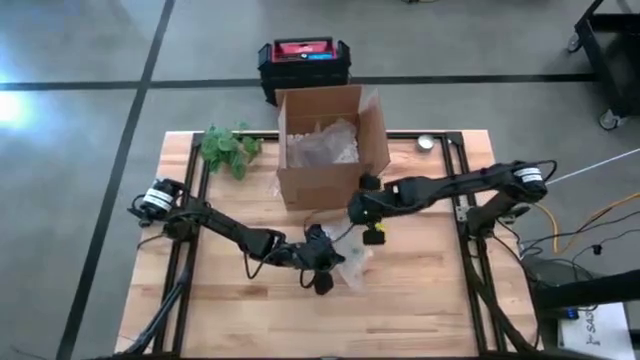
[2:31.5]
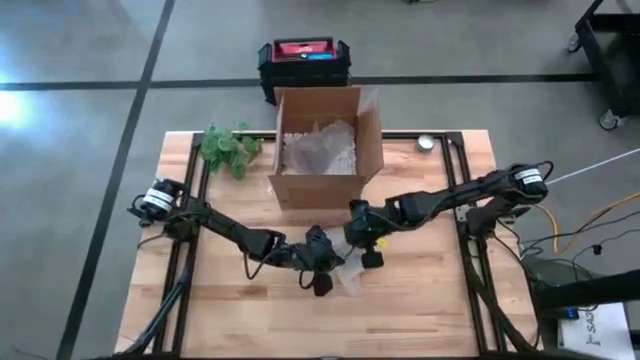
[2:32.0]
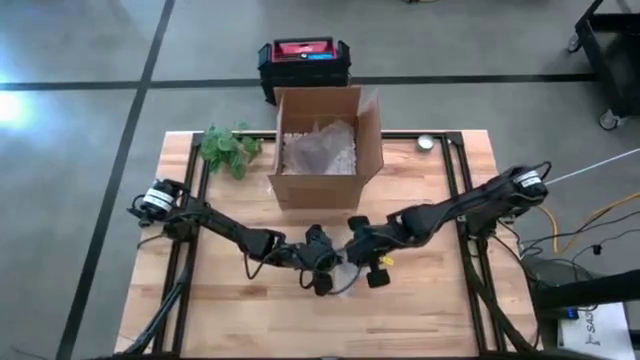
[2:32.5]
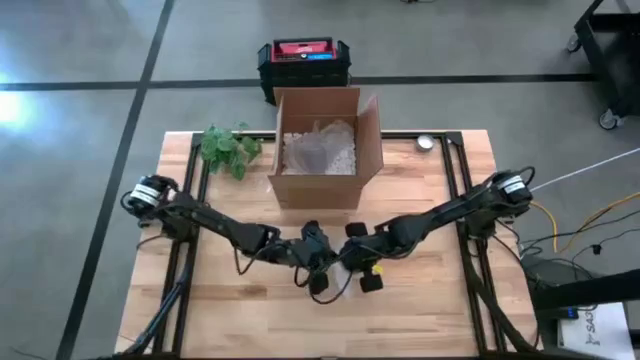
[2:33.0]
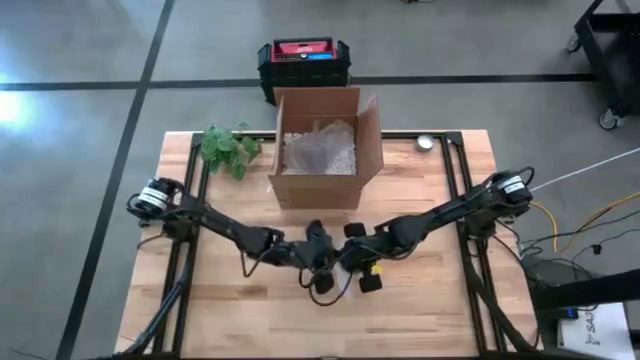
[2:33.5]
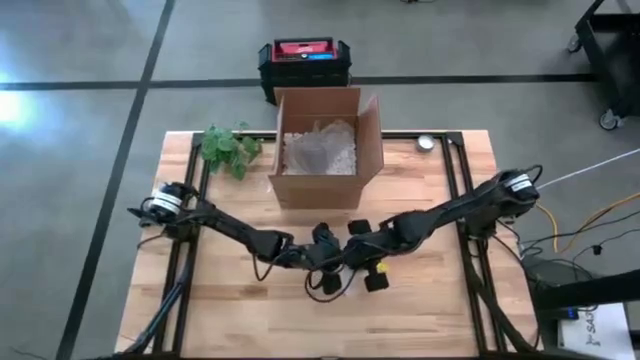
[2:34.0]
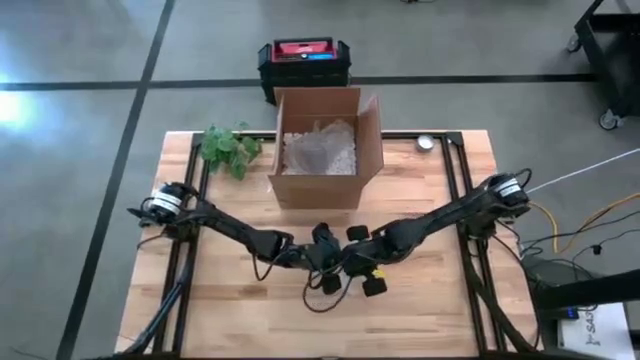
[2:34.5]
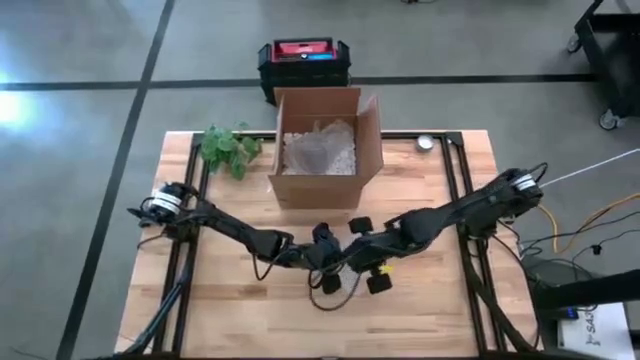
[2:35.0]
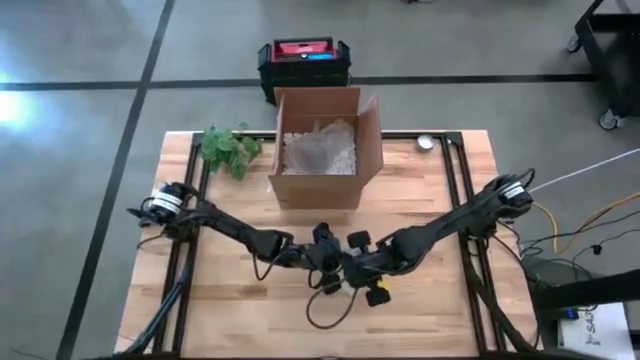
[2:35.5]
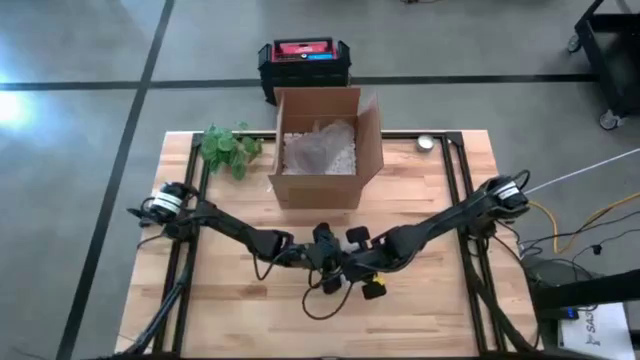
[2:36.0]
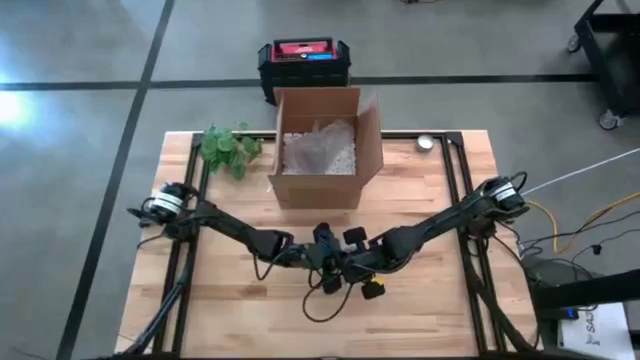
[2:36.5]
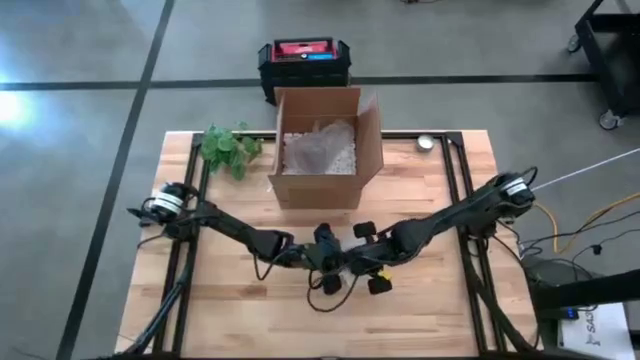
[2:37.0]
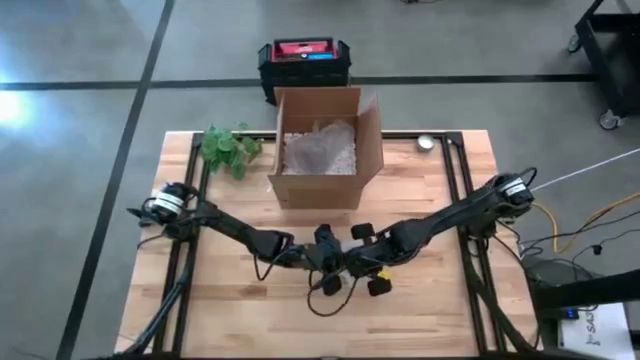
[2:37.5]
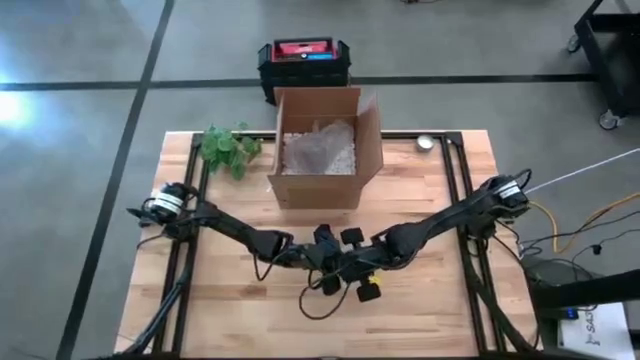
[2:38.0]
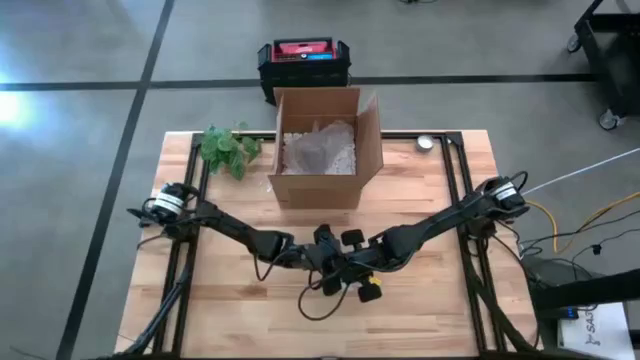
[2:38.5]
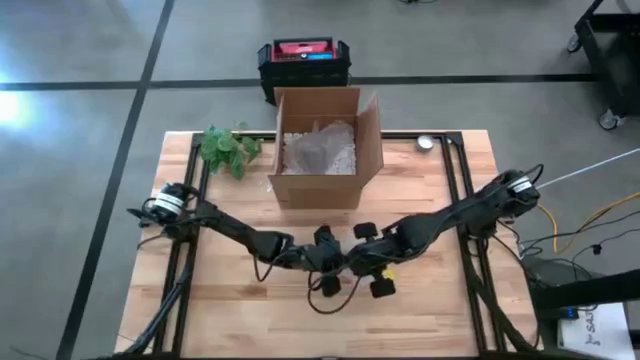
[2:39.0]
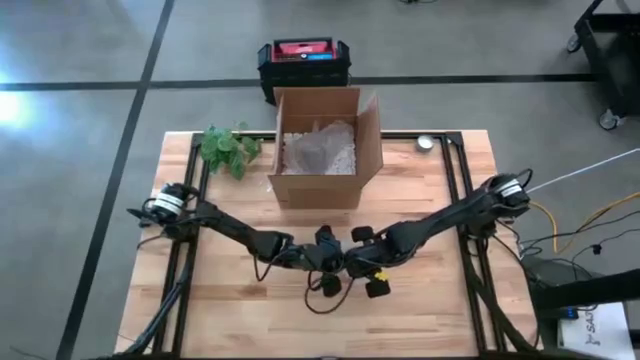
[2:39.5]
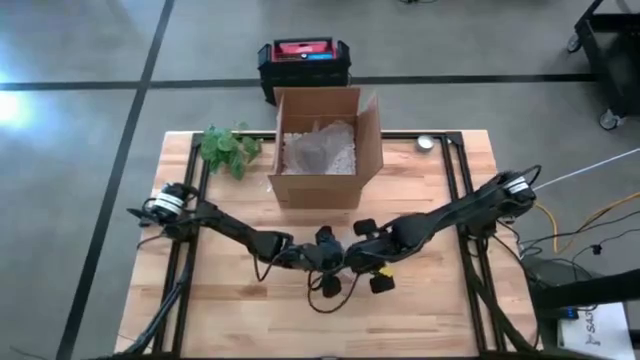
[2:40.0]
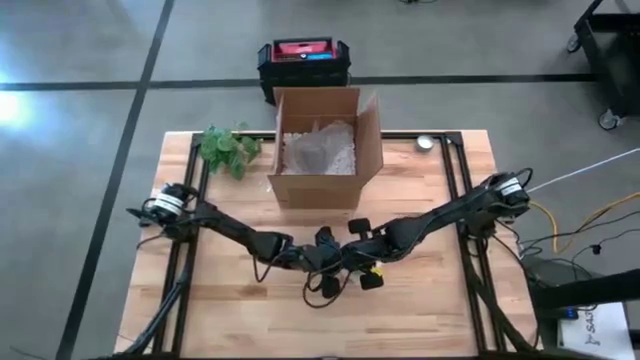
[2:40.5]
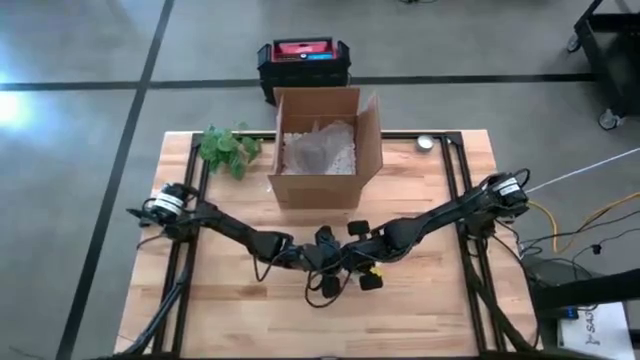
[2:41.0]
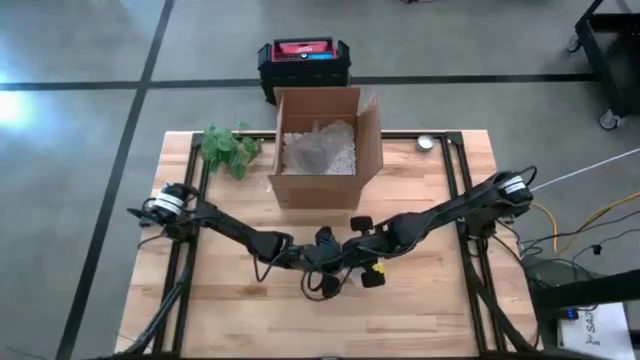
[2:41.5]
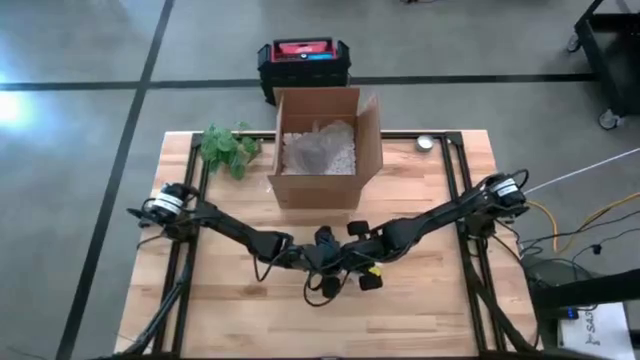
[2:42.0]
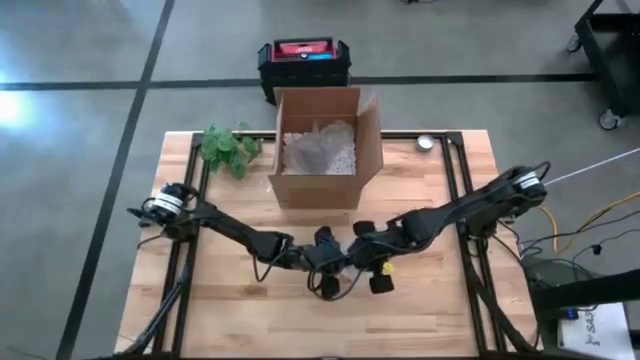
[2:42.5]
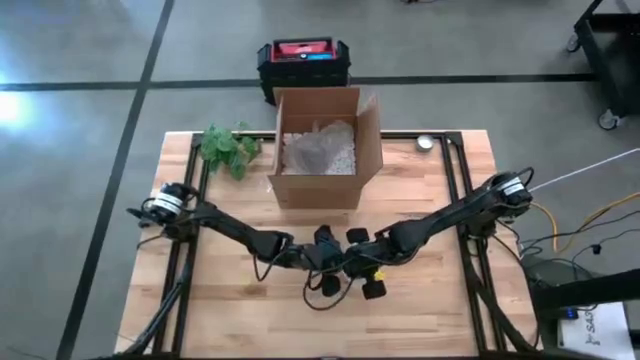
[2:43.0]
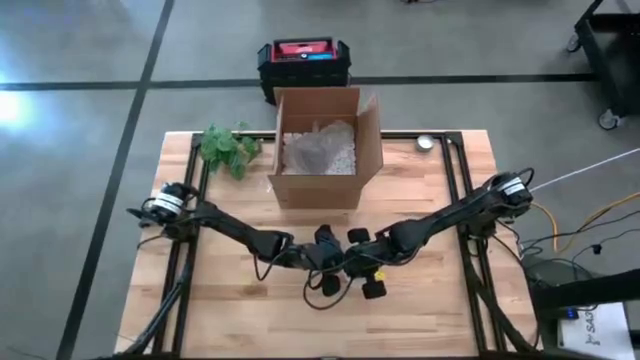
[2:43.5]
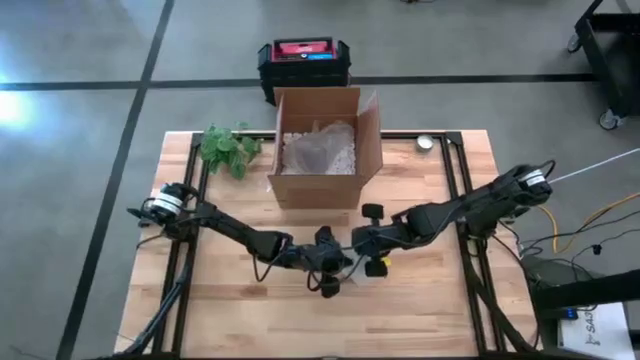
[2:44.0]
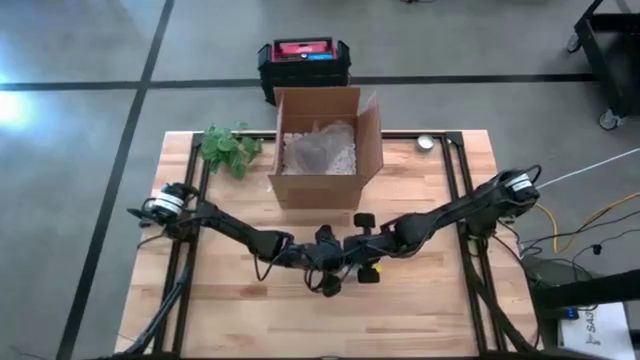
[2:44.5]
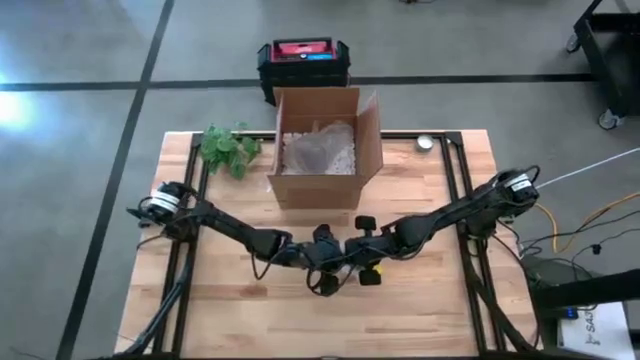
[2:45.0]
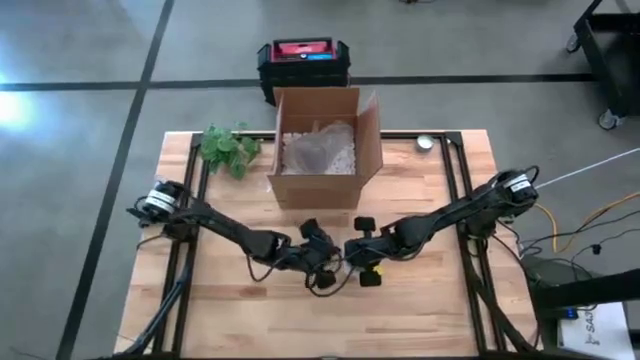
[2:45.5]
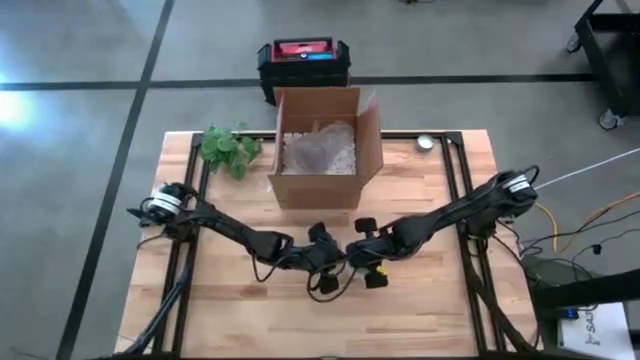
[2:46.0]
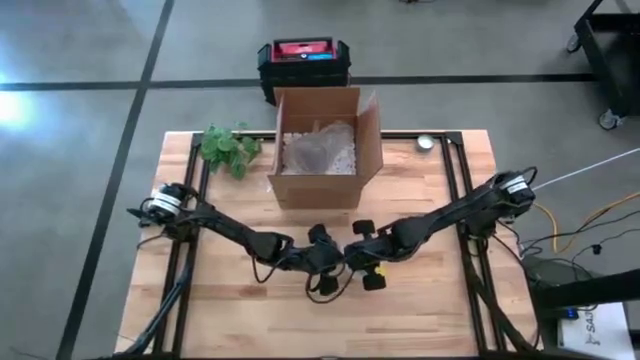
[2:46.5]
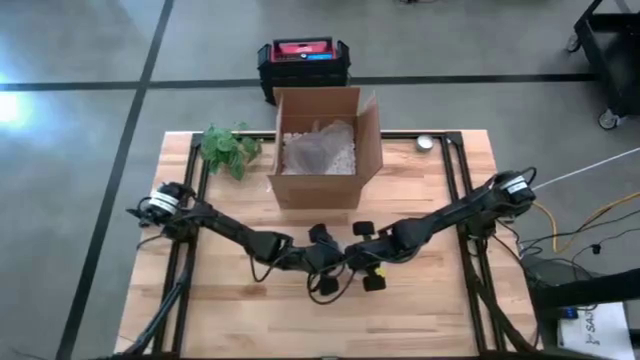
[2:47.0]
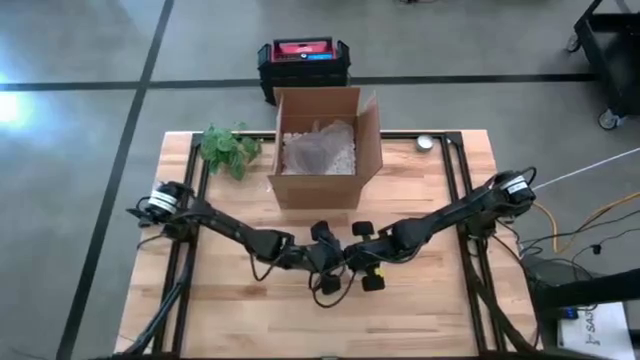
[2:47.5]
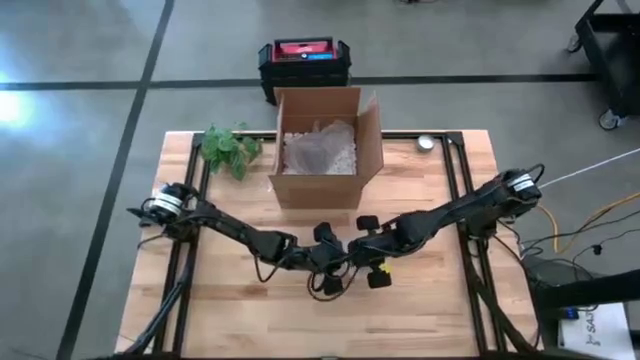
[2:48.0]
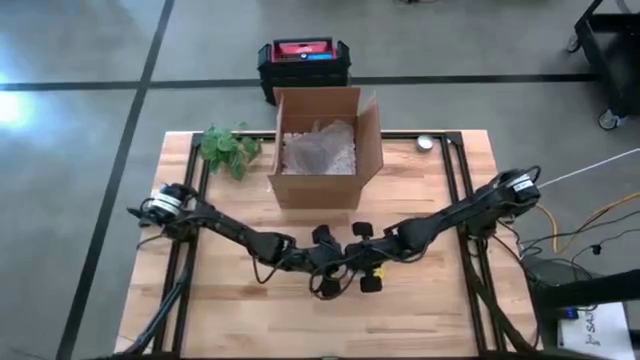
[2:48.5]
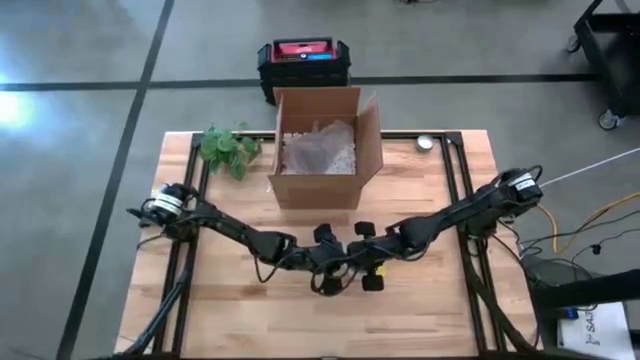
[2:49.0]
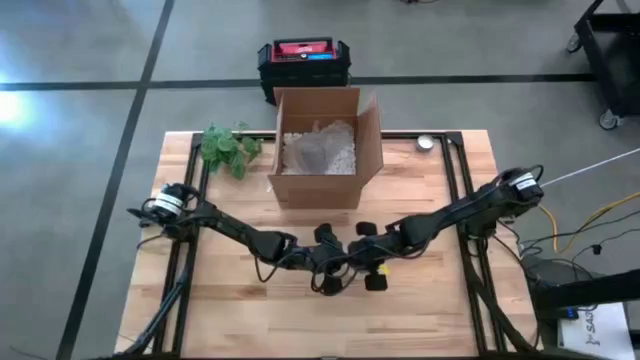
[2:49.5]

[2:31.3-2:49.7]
Task: wrap mug
Wrap the yellow mug with a bubble wrap

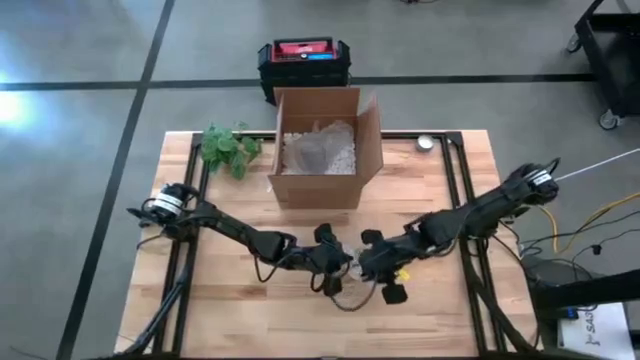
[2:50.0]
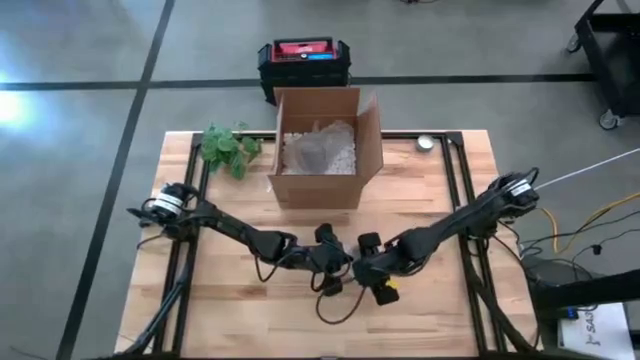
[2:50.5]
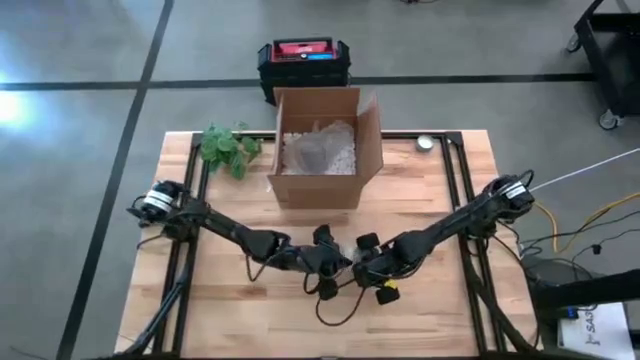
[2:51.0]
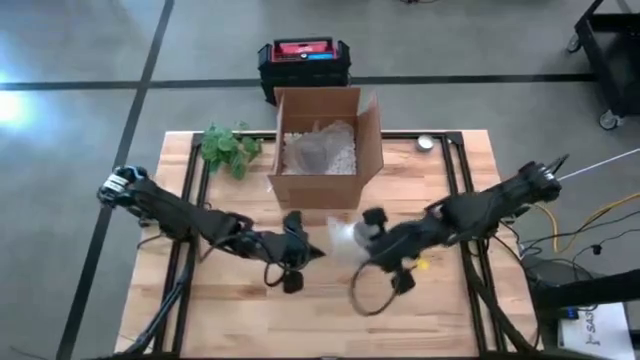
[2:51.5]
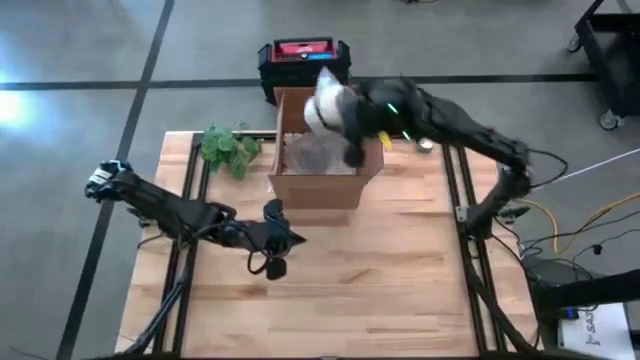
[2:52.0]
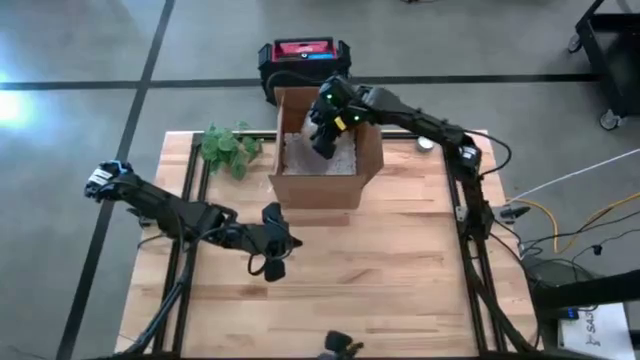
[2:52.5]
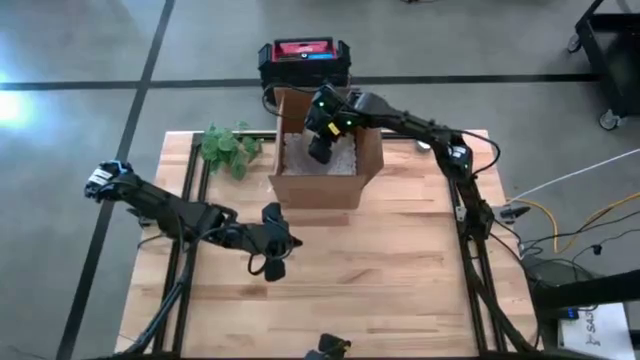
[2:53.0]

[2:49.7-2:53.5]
Put the wrapped yellow mug into the cardboard box
